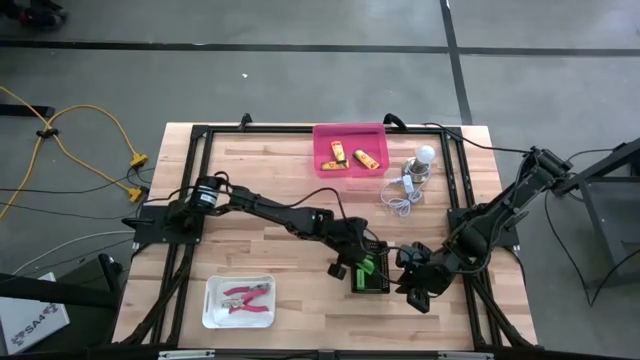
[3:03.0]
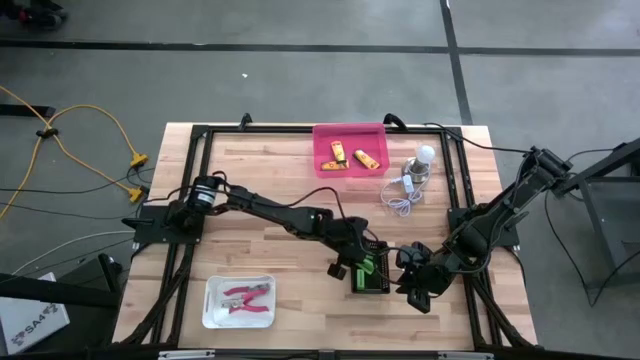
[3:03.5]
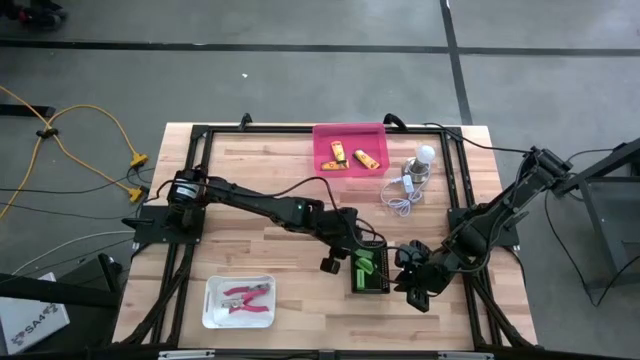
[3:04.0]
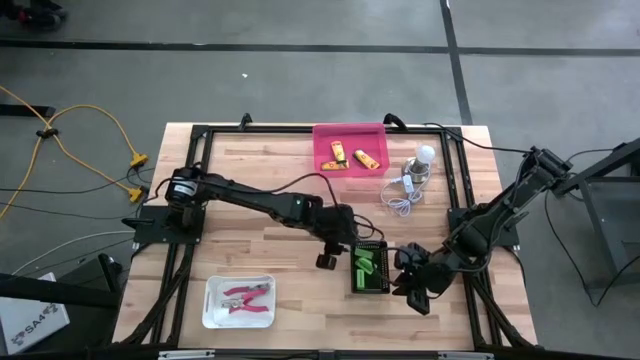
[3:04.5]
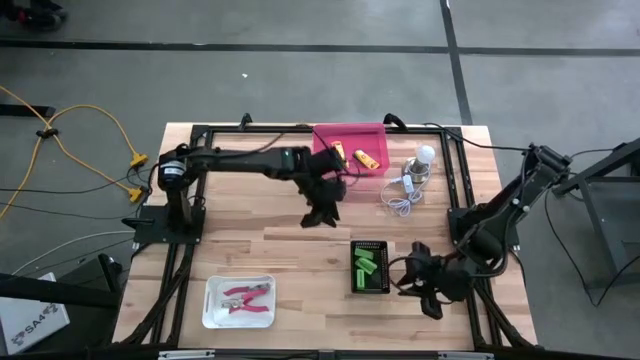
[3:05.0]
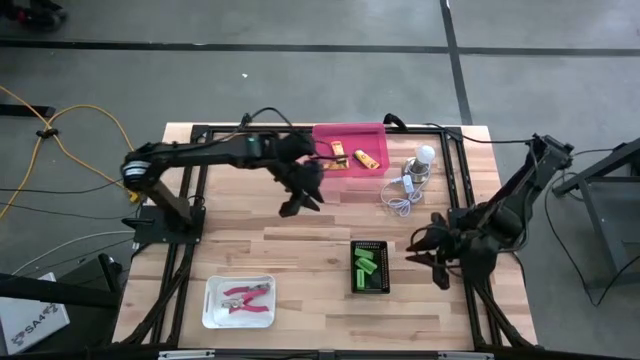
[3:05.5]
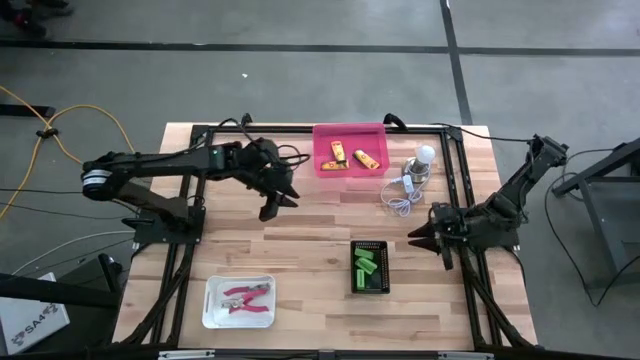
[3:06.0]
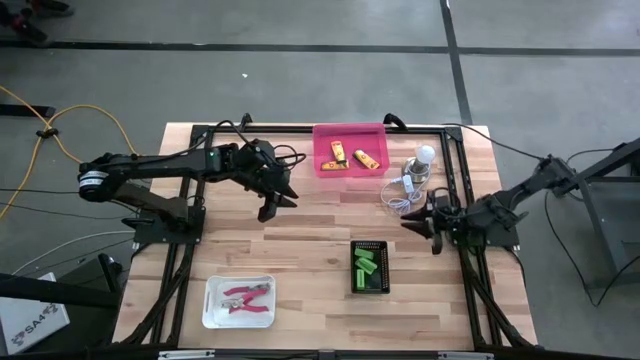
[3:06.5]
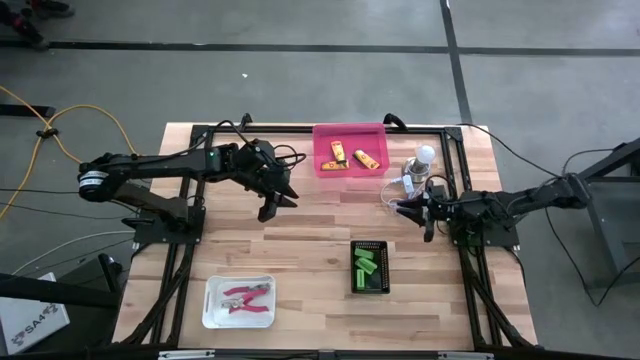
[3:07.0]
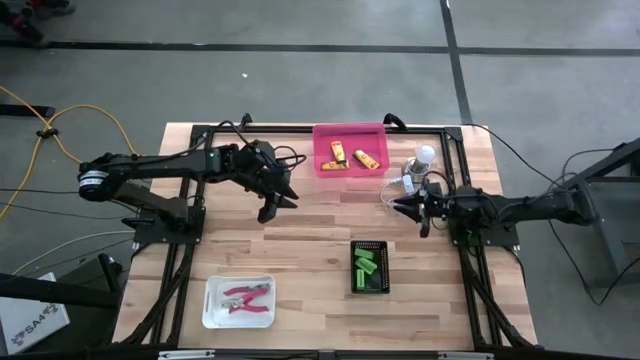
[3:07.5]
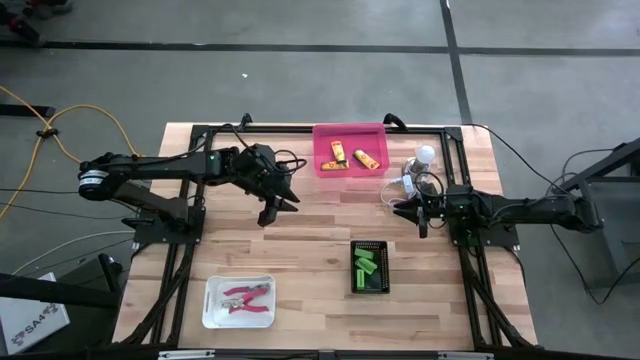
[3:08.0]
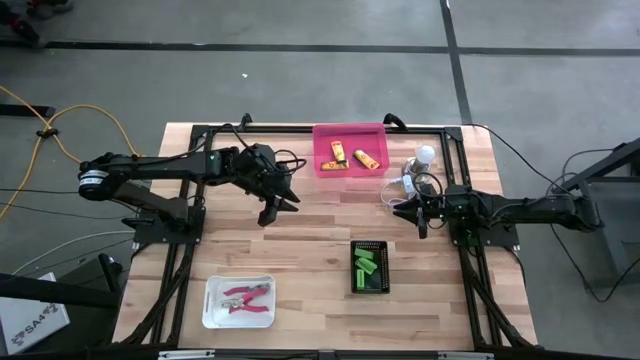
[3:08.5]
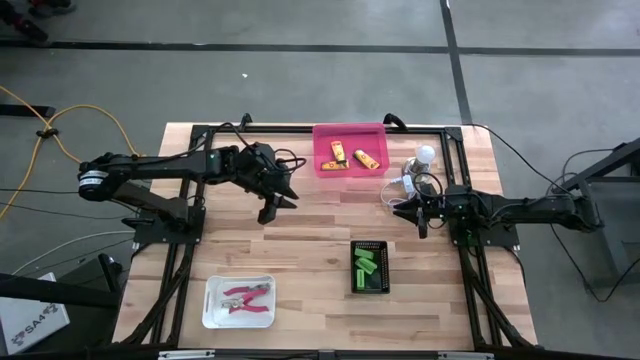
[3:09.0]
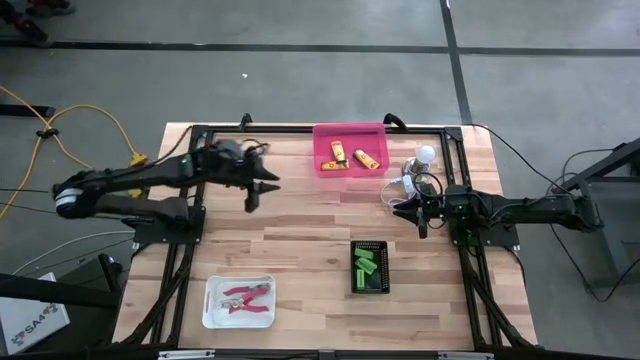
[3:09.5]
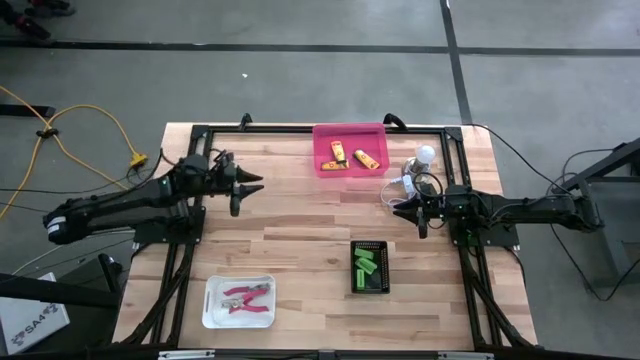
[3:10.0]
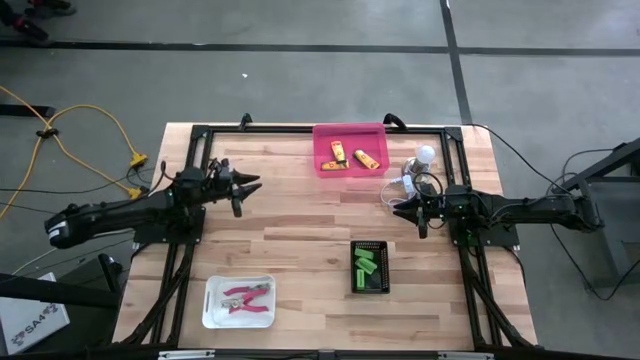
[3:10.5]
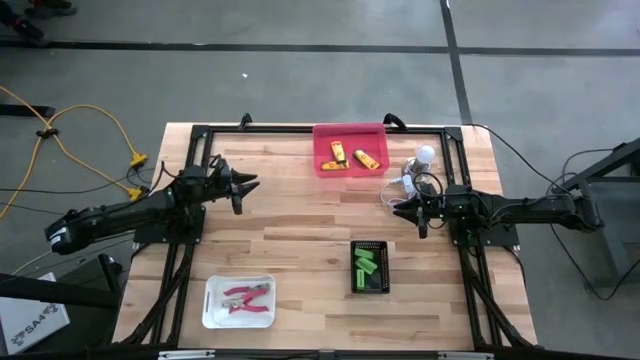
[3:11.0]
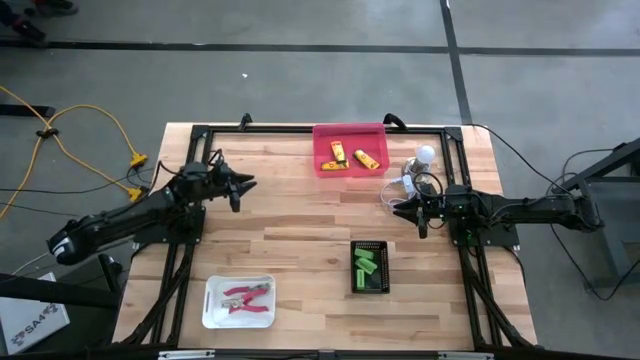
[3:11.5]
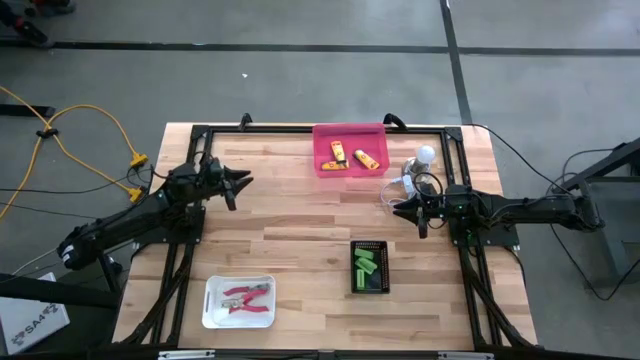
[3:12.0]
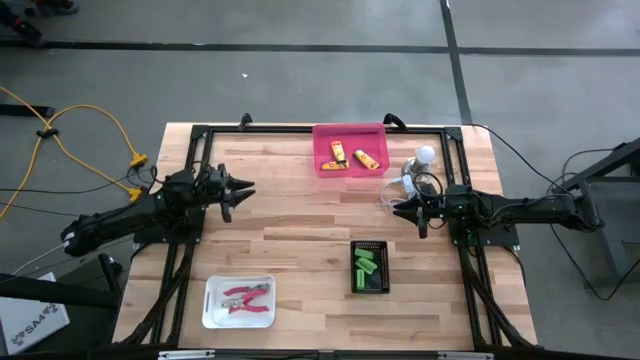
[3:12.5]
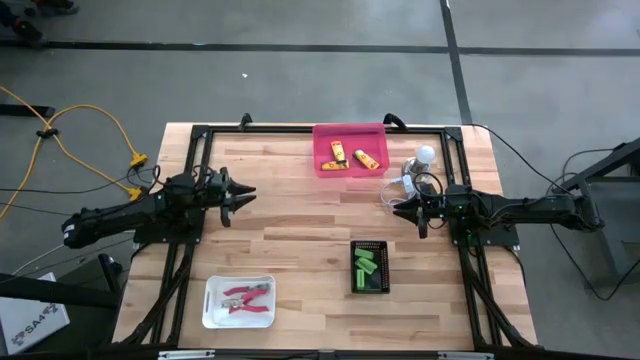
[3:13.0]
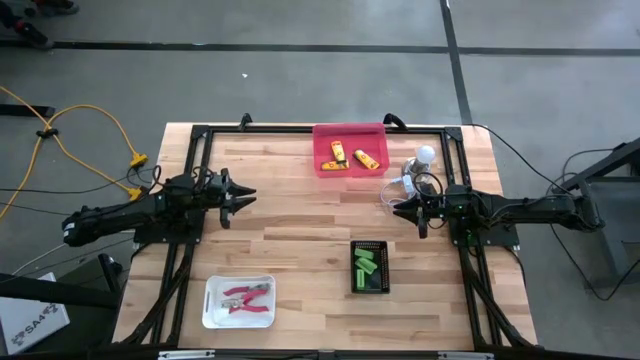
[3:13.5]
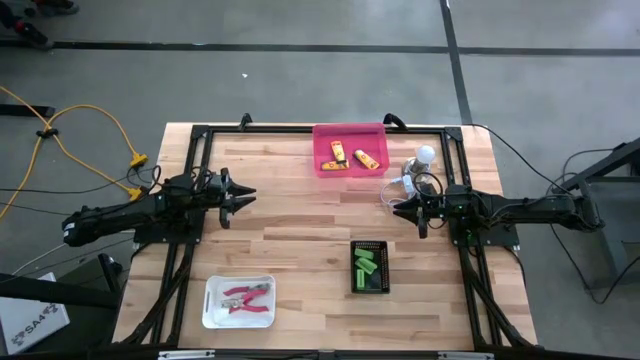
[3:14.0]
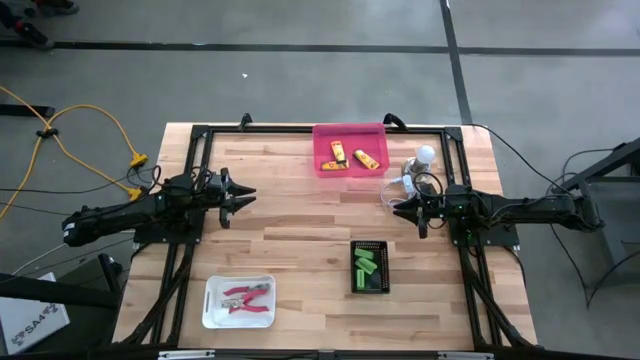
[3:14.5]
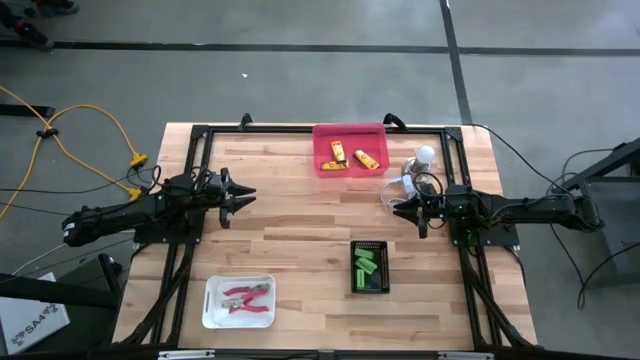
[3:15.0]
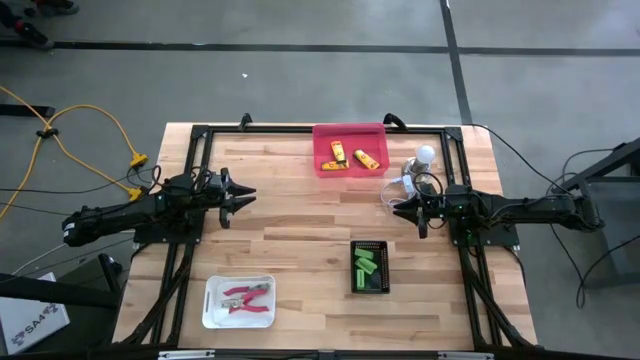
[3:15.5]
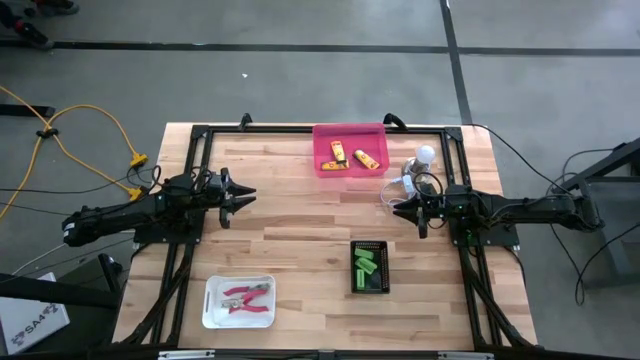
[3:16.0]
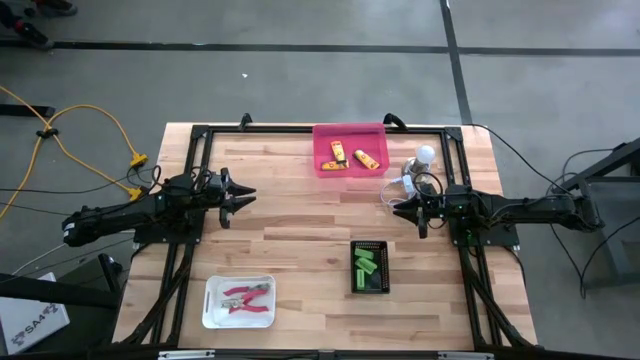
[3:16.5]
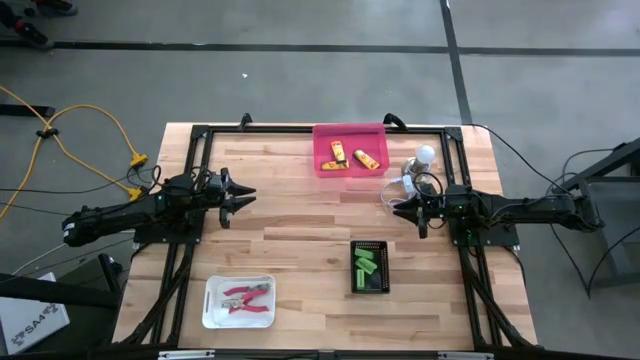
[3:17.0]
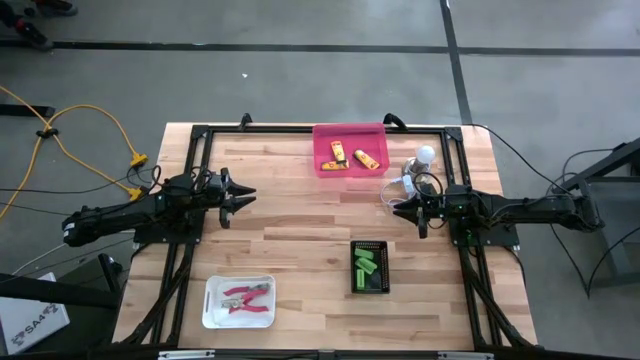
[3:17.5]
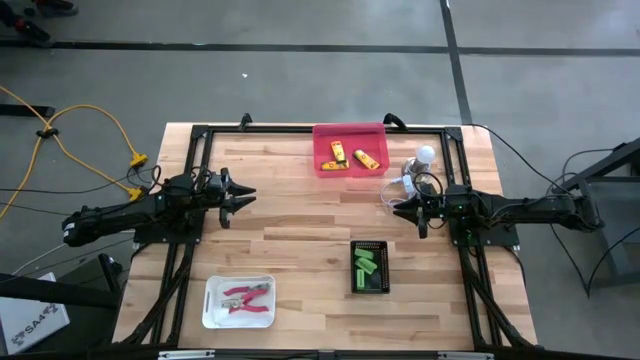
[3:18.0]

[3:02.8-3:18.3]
Task: Pick & Place School Supplies
Return to home position

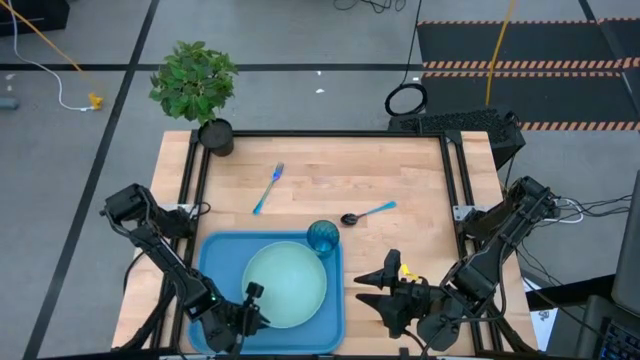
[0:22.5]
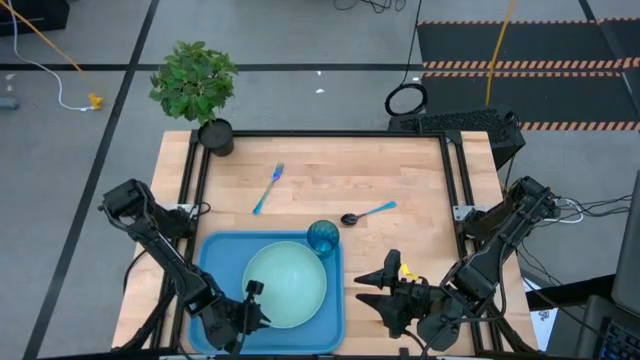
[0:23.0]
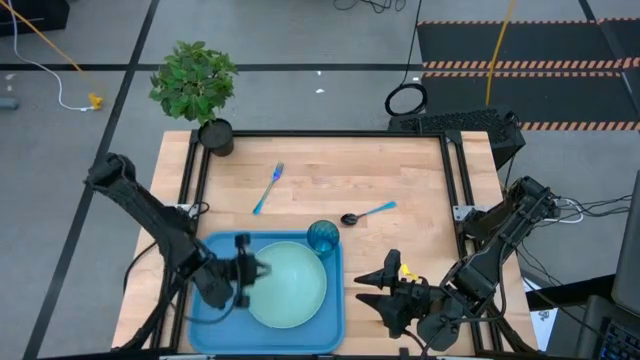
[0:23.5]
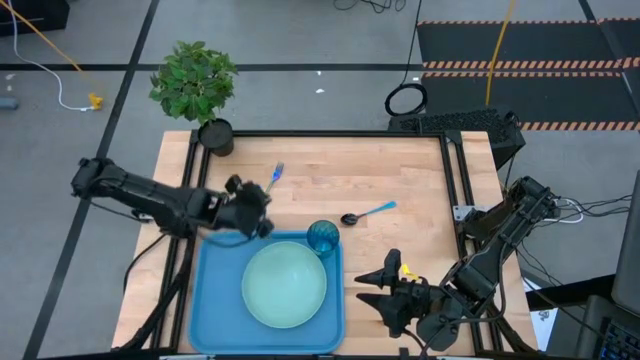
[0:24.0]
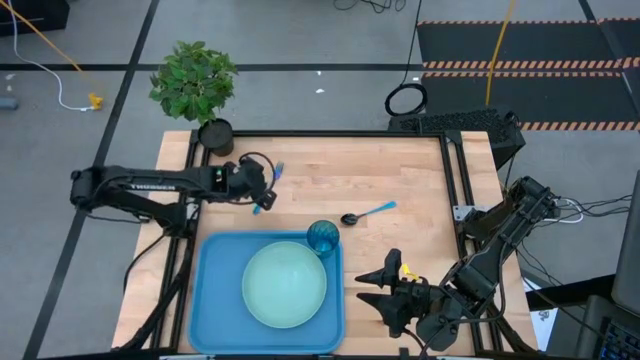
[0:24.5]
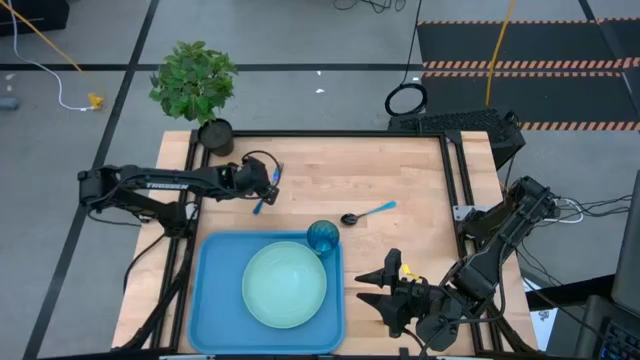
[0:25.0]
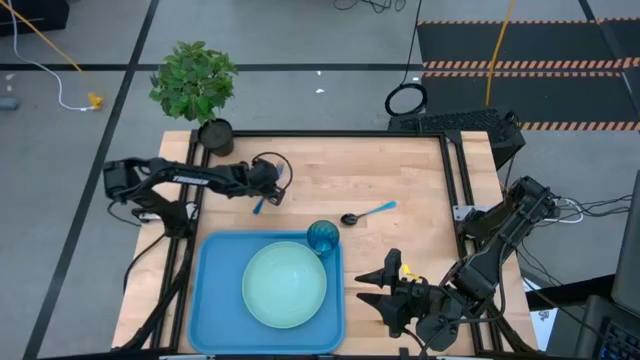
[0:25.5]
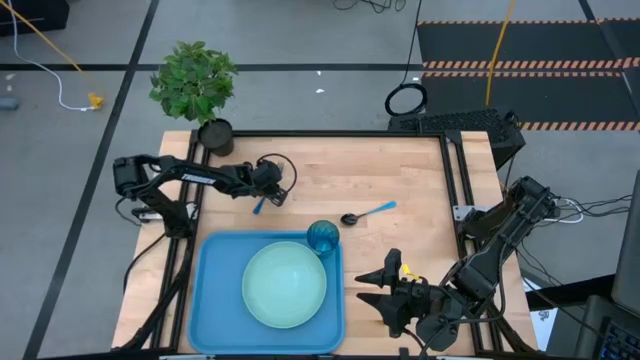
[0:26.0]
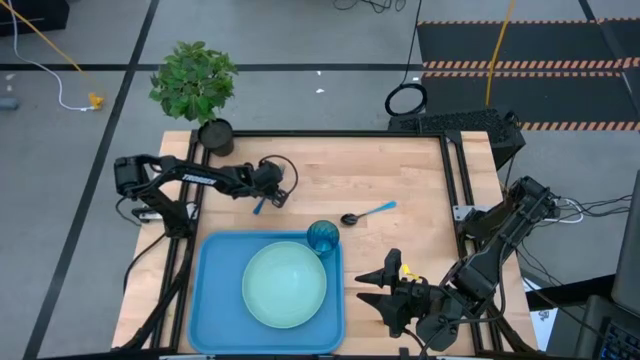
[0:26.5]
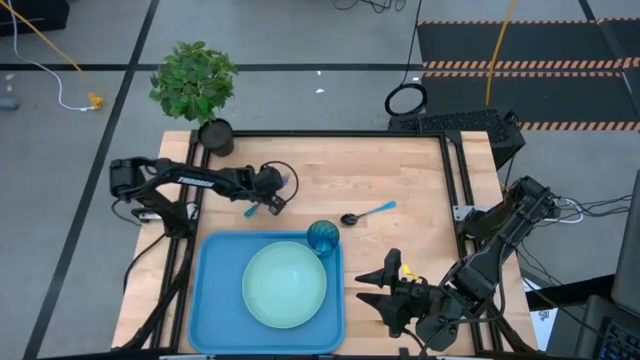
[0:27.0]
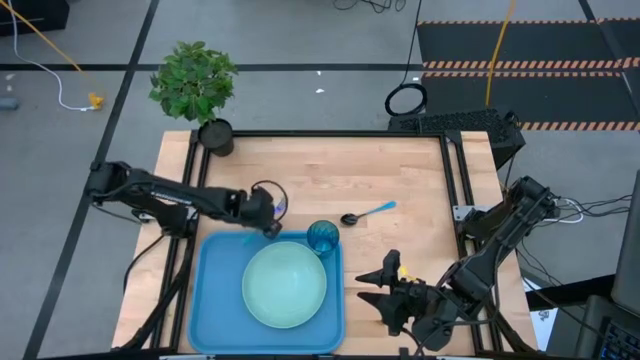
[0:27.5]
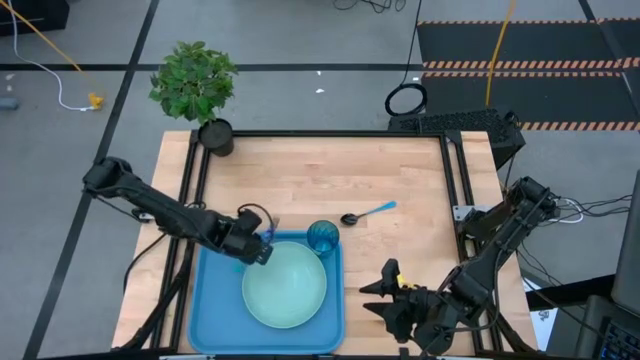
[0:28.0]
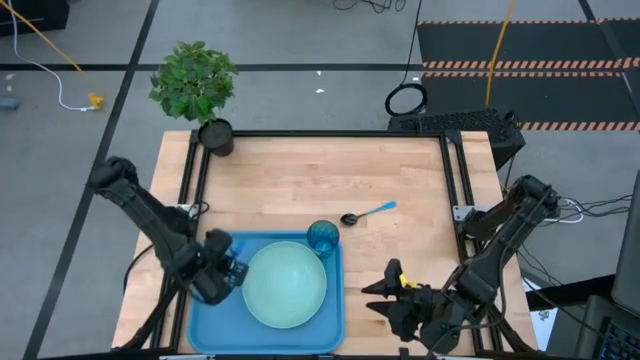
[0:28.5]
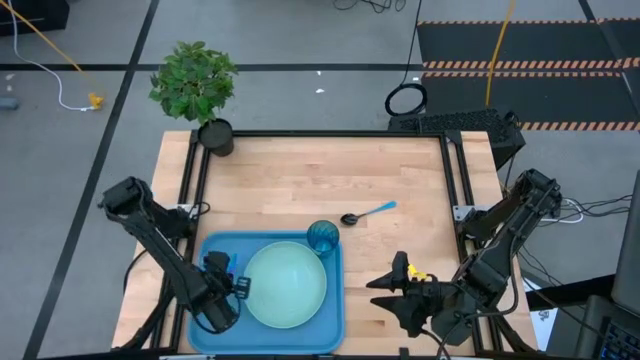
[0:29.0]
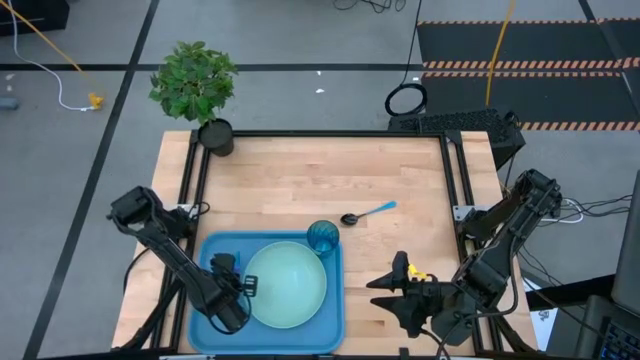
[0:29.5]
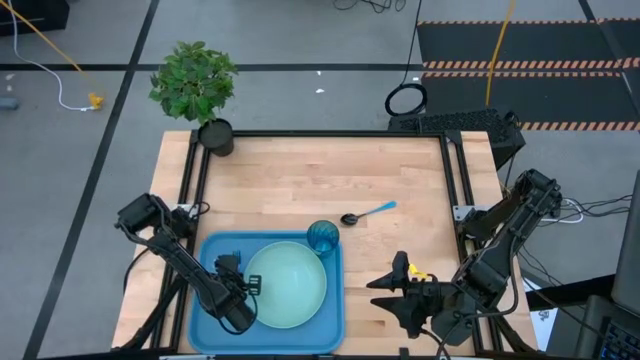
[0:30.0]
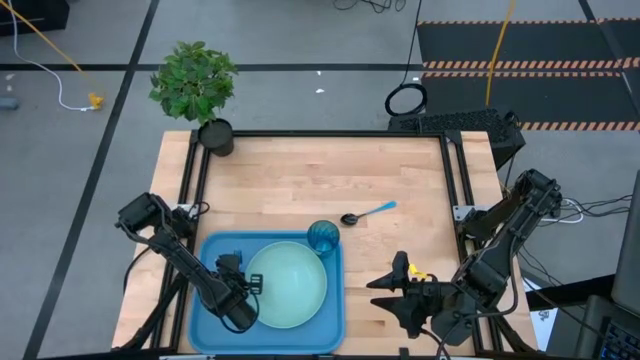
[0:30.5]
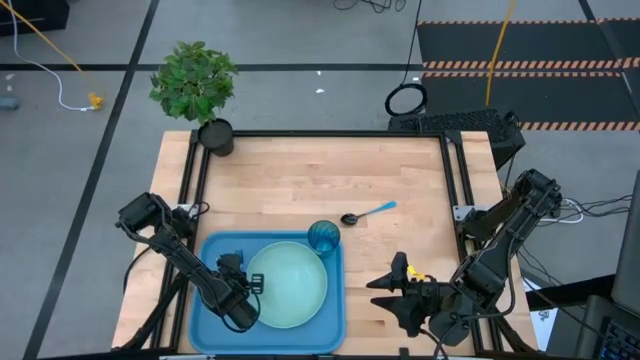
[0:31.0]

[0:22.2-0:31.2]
Task: Pick and place plate/cup/fork/spoon on tray
Put the blue fork beside the white plate
